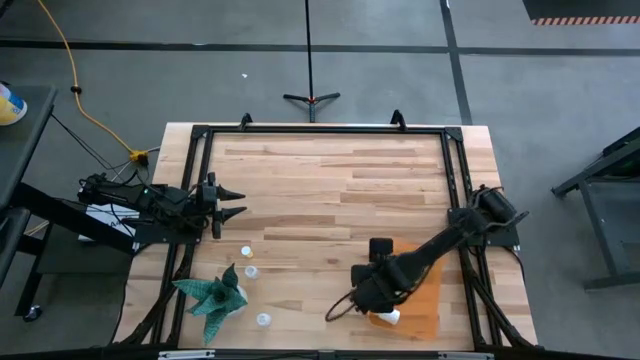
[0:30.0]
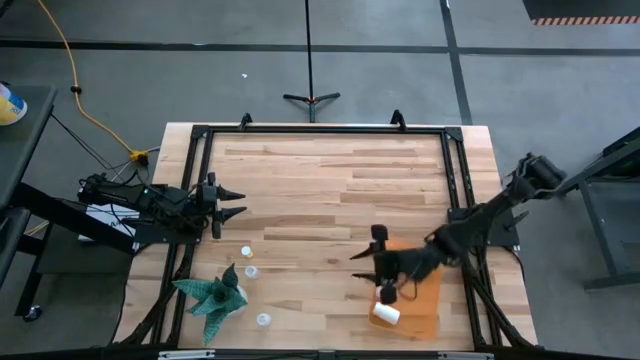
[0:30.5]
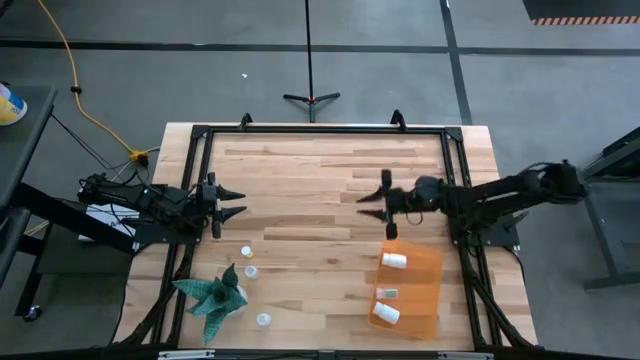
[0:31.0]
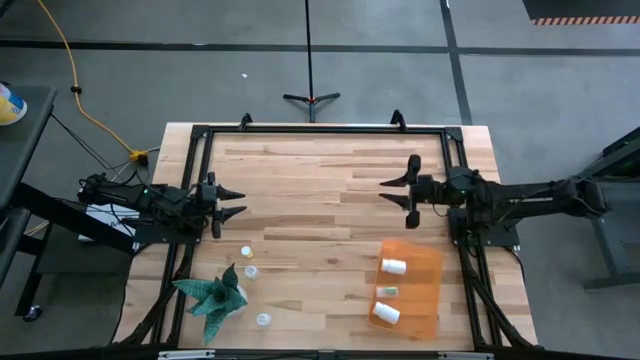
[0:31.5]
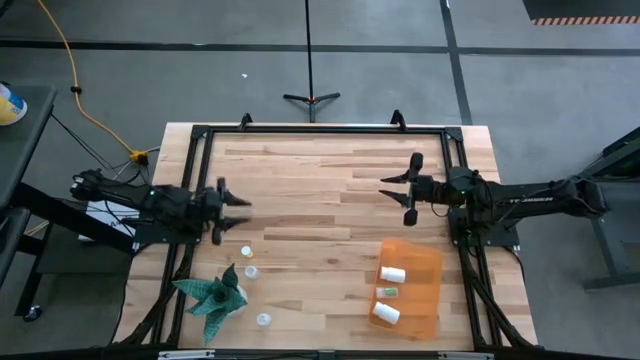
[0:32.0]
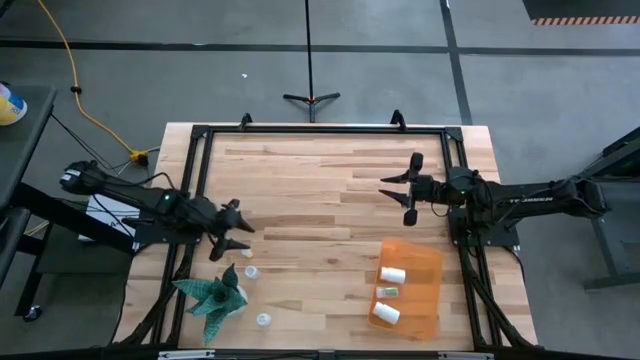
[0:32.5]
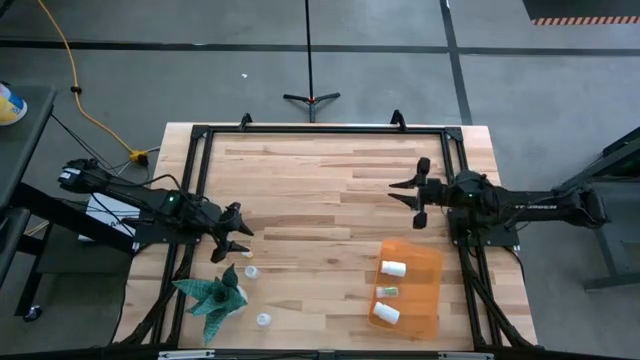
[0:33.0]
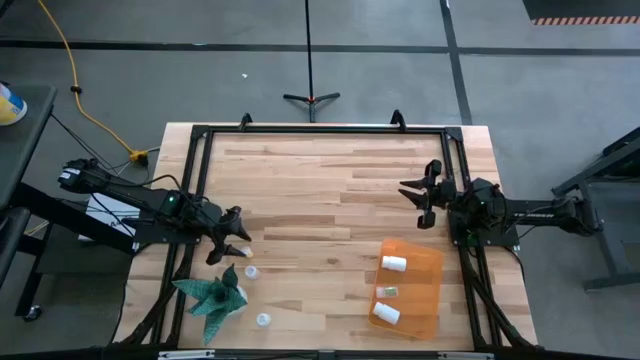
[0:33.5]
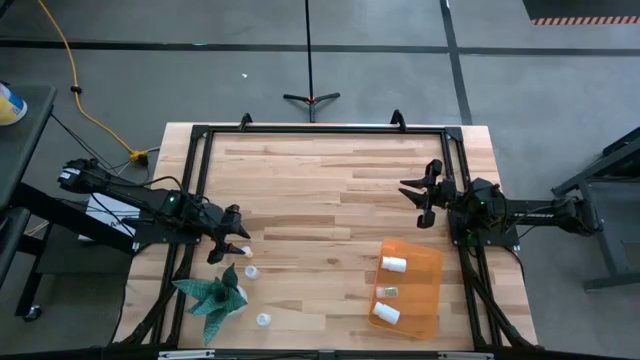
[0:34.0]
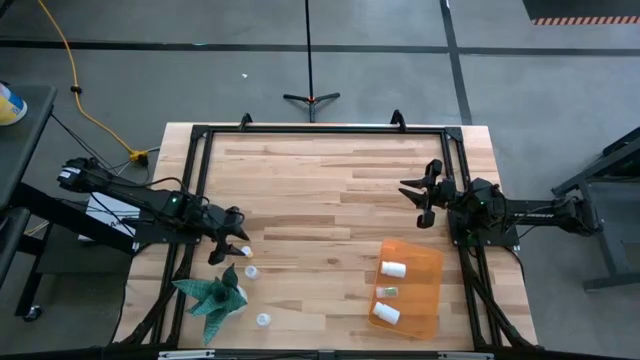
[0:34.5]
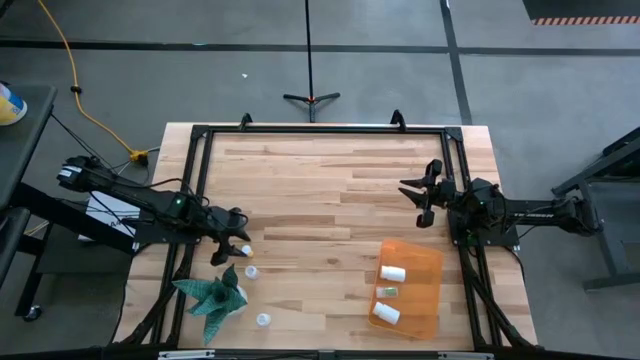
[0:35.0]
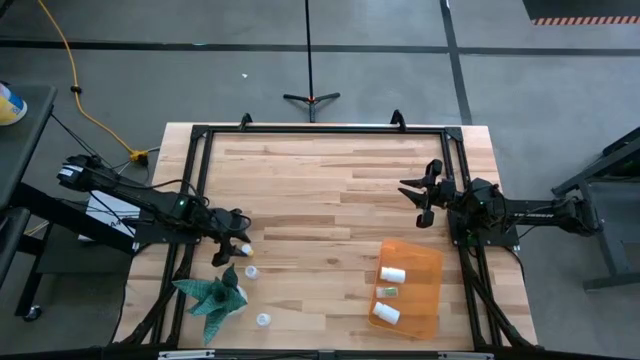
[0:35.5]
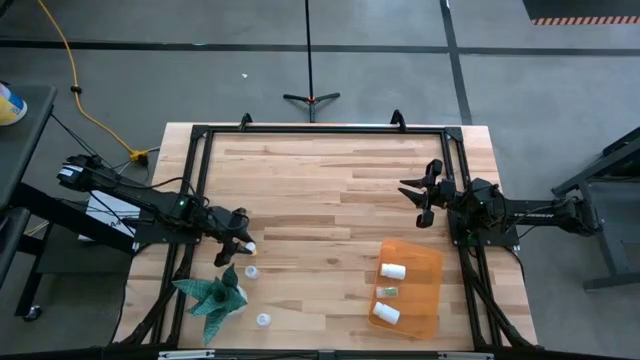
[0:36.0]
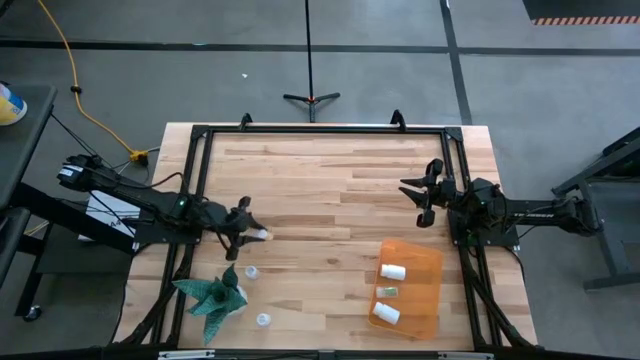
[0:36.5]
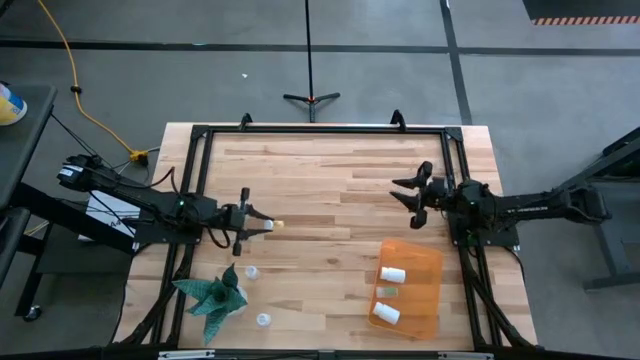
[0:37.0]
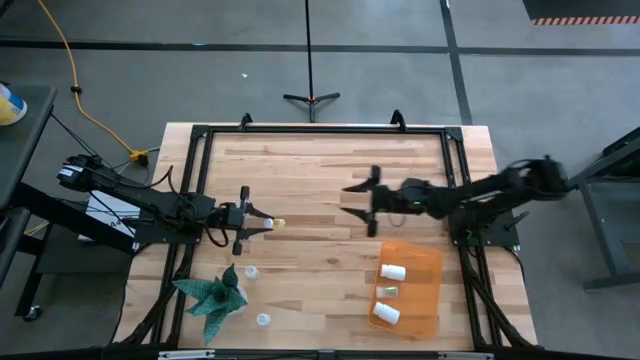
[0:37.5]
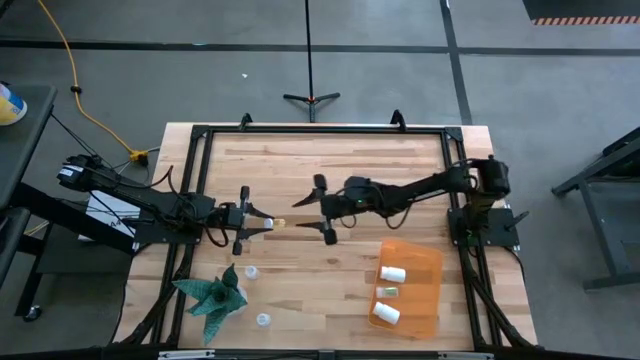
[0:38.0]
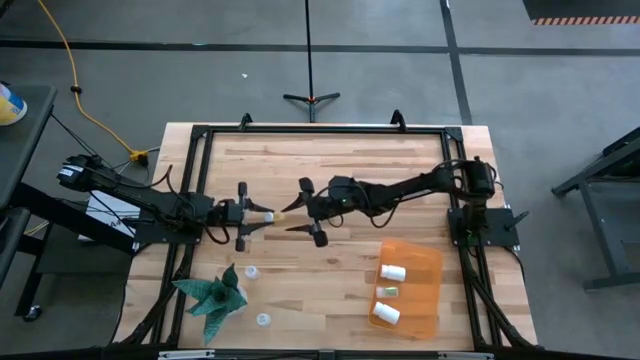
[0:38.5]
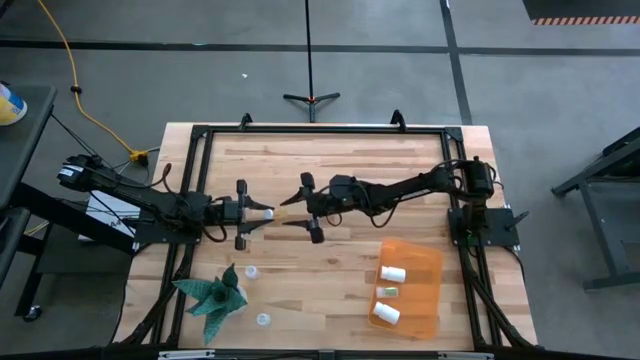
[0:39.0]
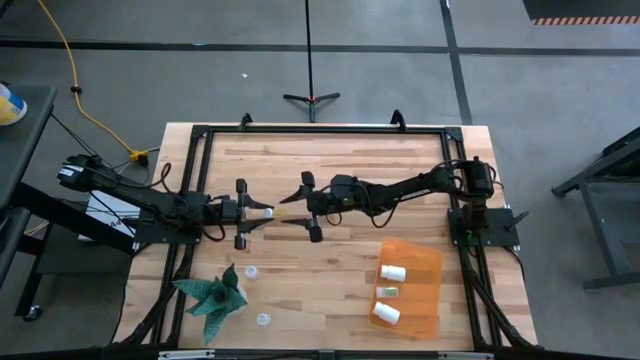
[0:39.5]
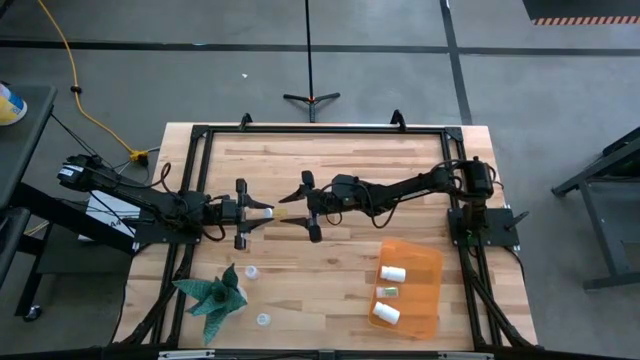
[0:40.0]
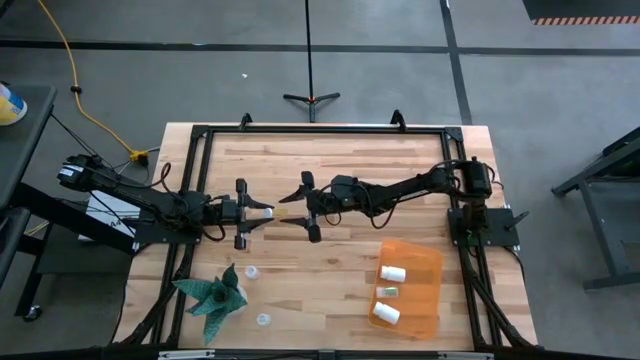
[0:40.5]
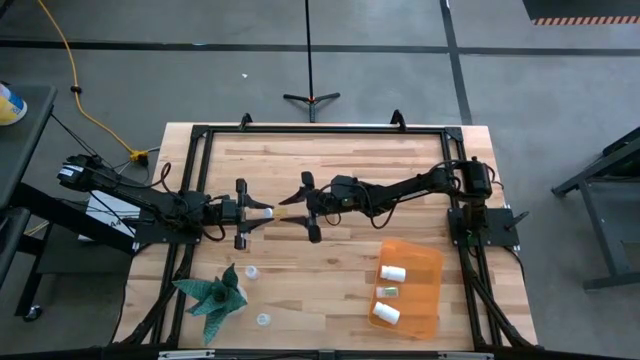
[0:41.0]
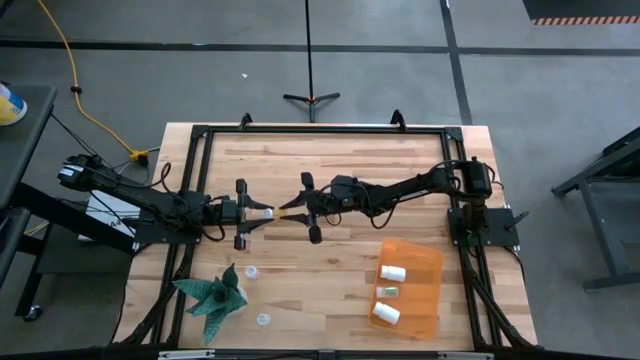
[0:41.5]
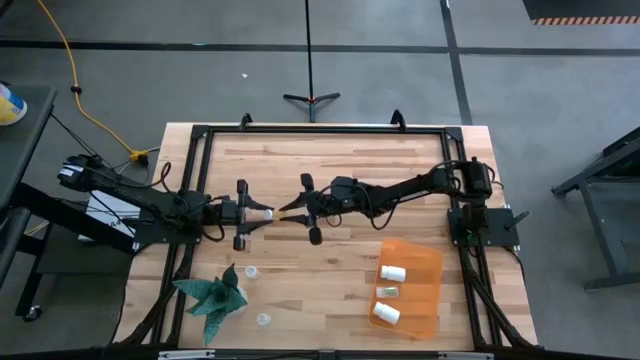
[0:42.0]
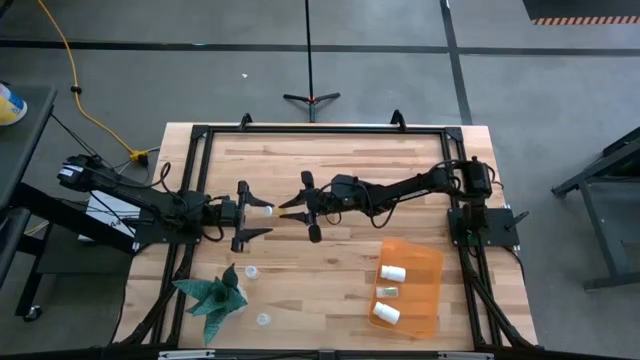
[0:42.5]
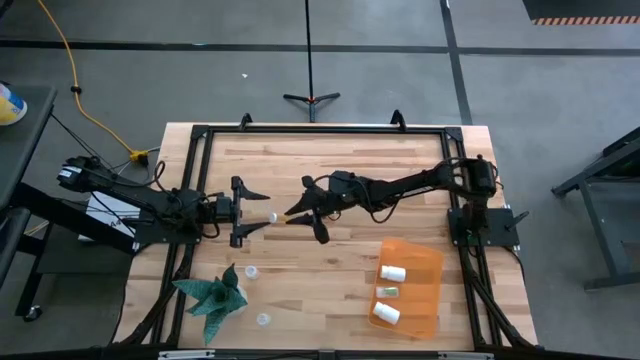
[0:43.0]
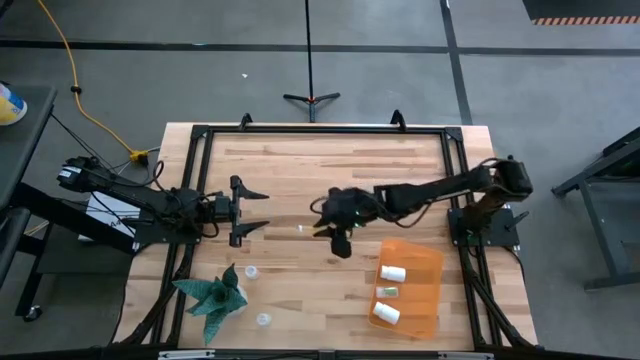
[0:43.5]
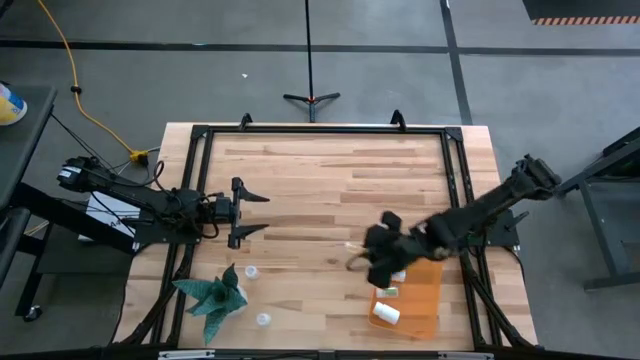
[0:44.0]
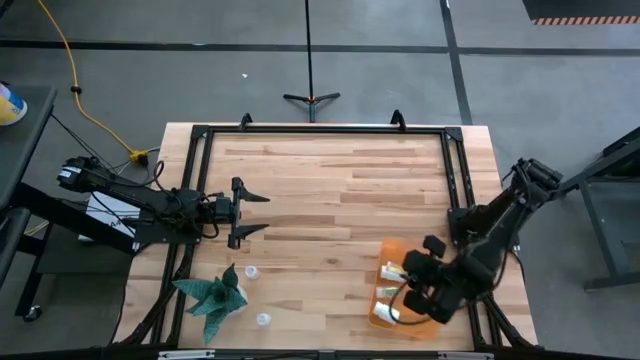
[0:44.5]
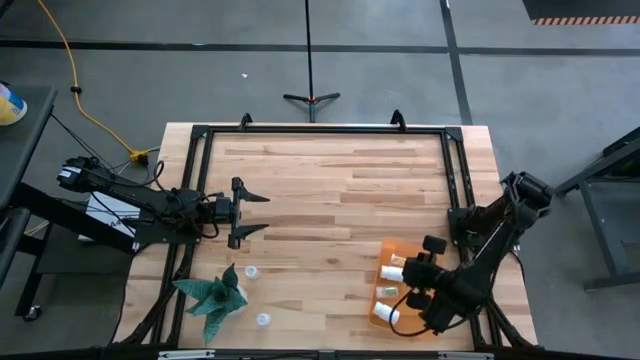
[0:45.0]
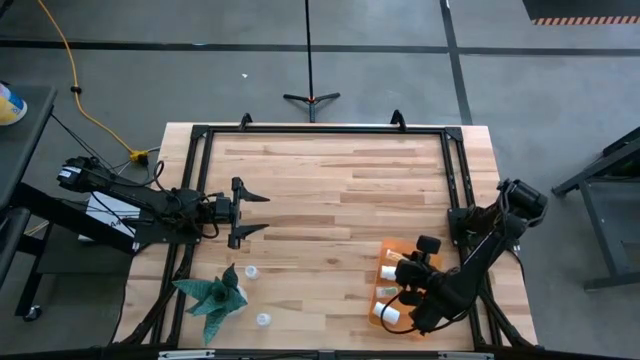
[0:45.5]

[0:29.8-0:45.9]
Task: Pick and place pill bottles into a basket
Put the yellow medicine bottle into the orange bin

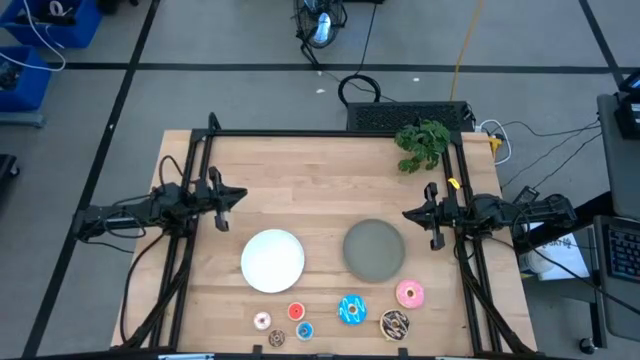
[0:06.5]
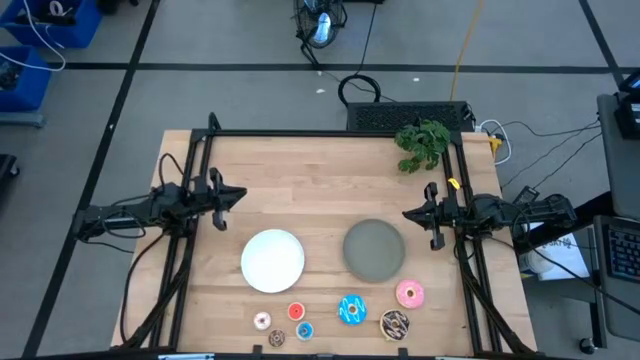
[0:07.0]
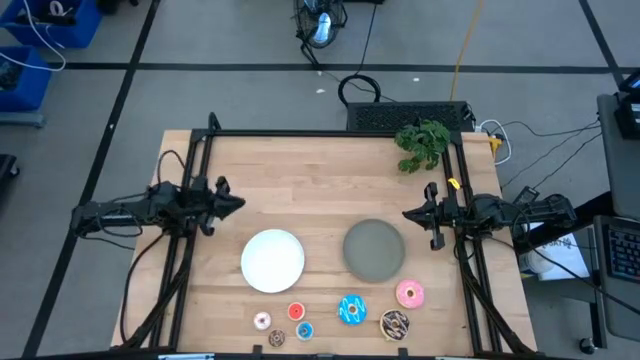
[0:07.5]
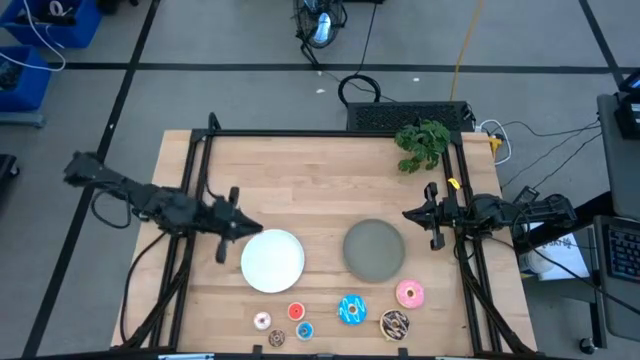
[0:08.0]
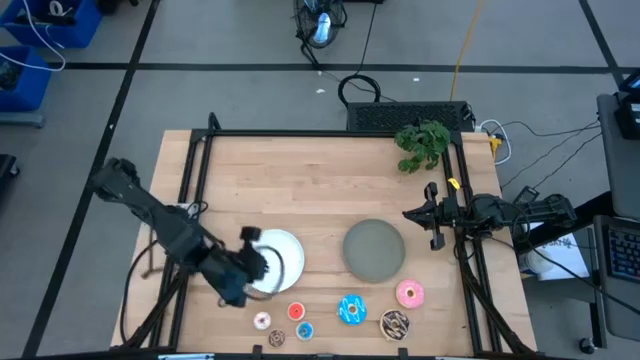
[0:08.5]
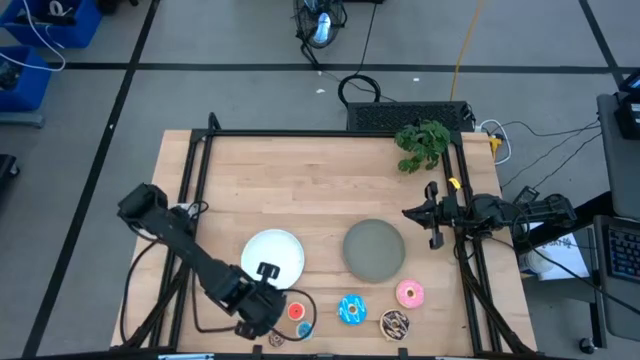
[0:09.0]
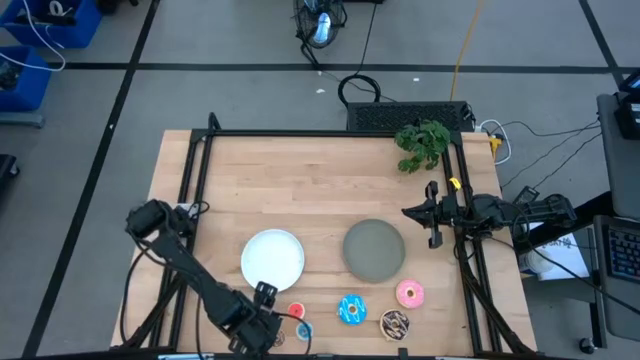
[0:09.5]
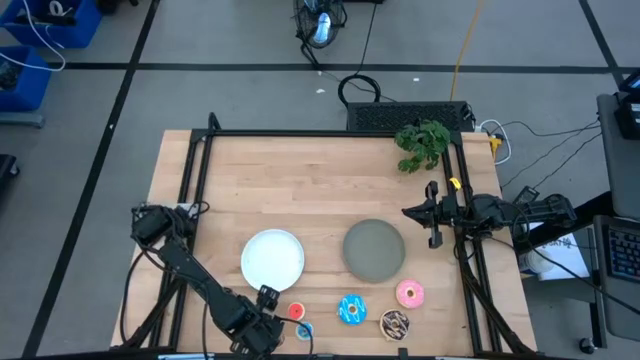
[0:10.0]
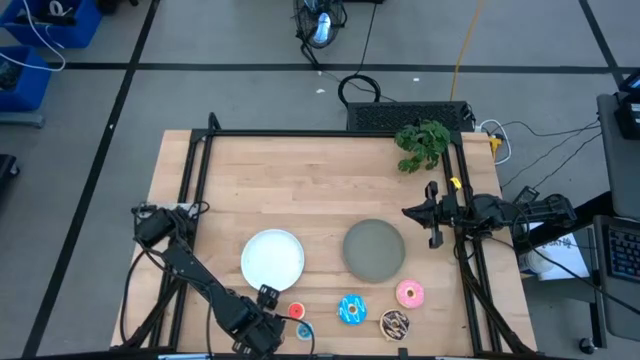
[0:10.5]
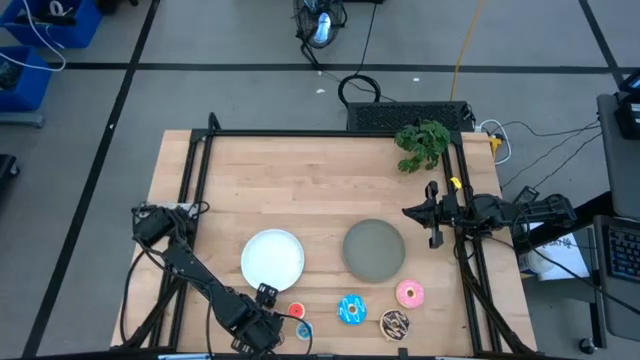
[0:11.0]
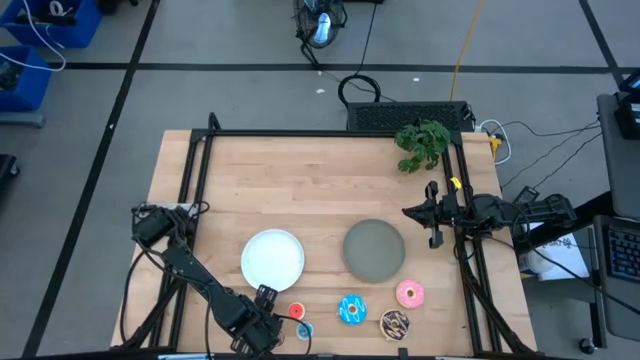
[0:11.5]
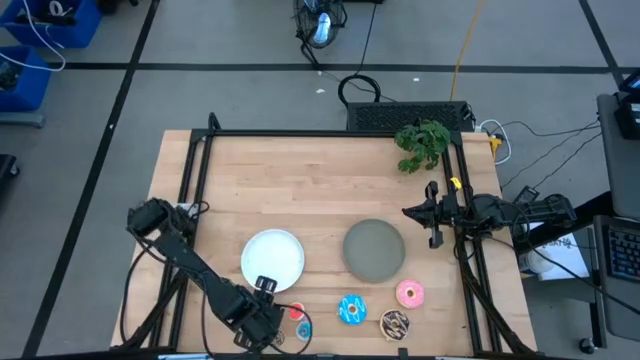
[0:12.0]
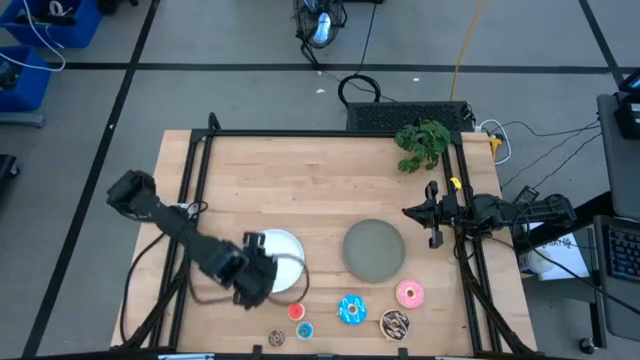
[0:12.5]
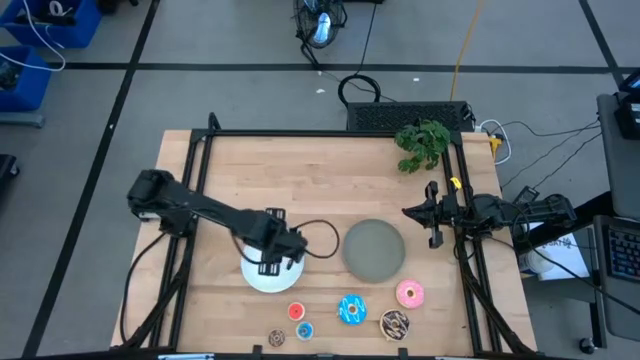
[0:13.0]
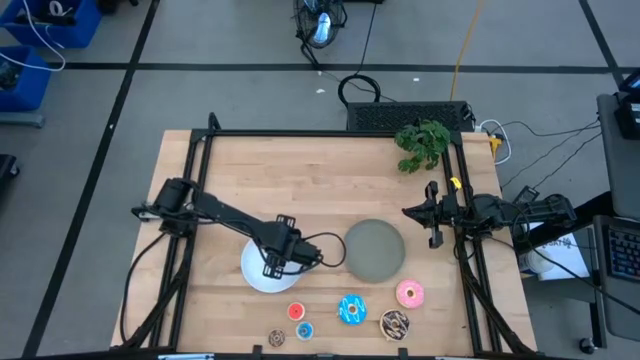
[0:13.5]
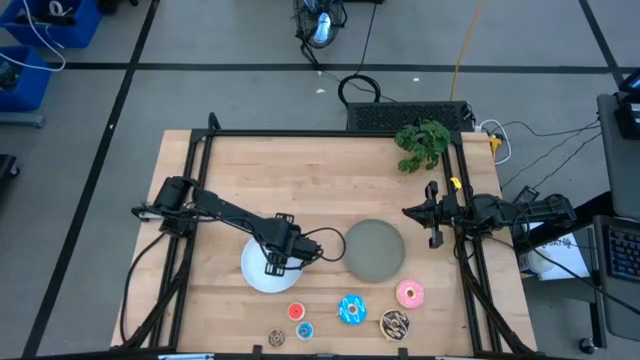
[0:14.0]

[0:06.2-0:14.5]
Task: Pick & Place donuts
Put the small white donut on the white plate
